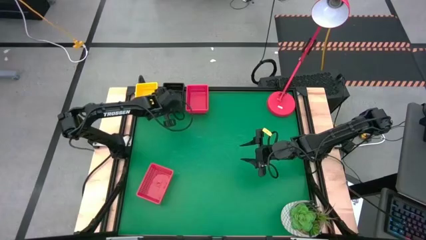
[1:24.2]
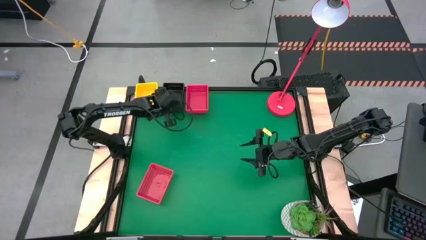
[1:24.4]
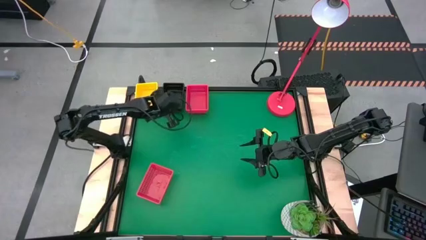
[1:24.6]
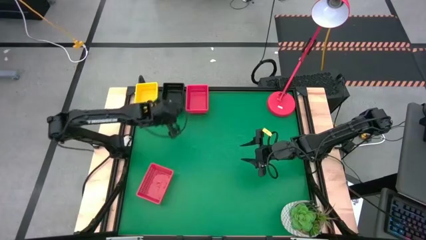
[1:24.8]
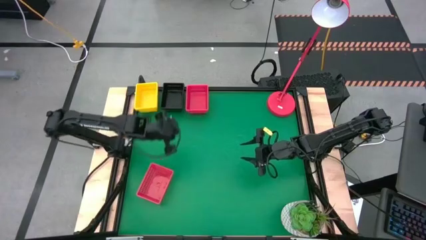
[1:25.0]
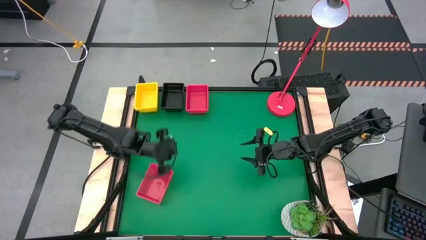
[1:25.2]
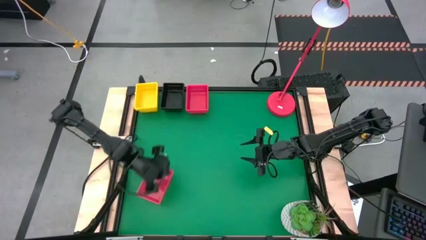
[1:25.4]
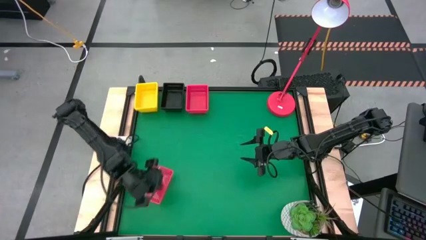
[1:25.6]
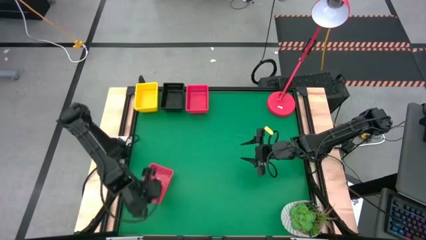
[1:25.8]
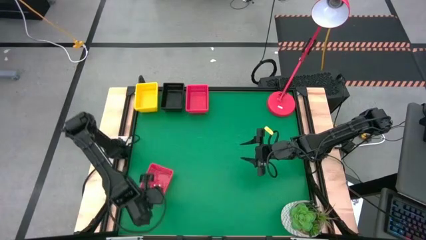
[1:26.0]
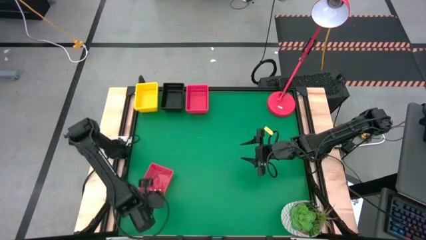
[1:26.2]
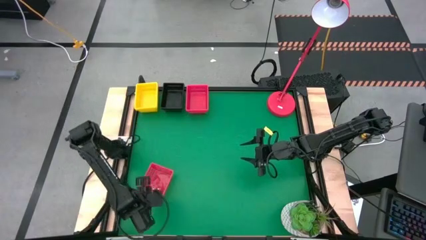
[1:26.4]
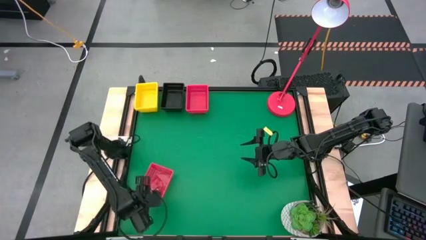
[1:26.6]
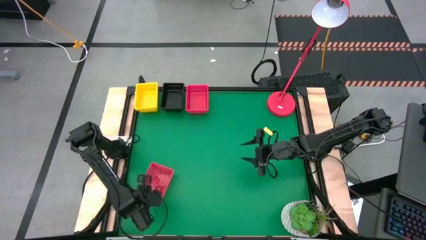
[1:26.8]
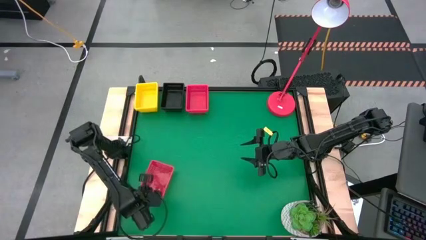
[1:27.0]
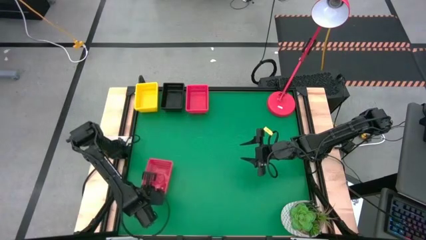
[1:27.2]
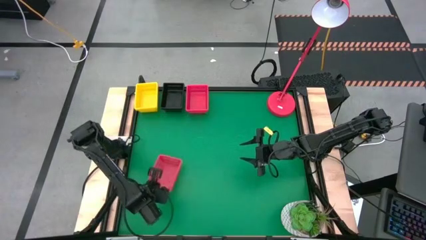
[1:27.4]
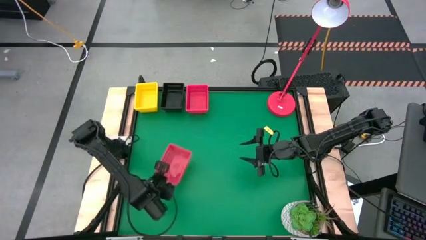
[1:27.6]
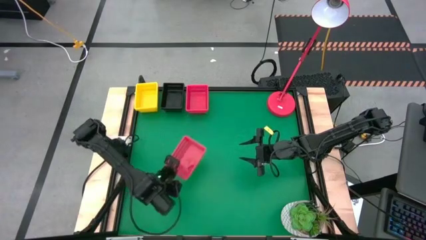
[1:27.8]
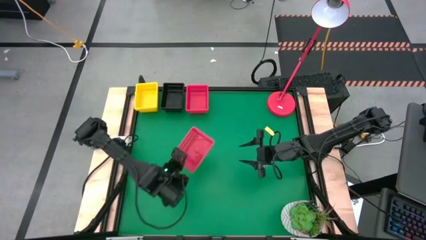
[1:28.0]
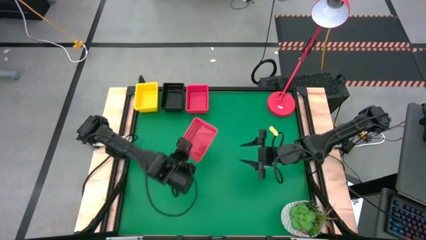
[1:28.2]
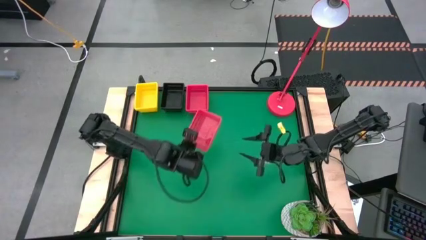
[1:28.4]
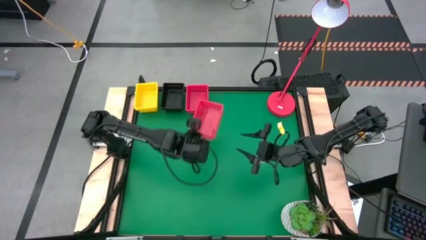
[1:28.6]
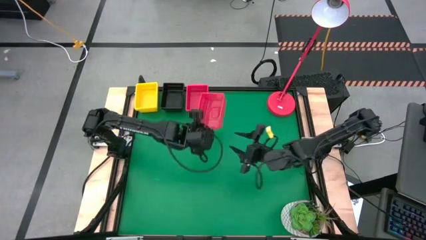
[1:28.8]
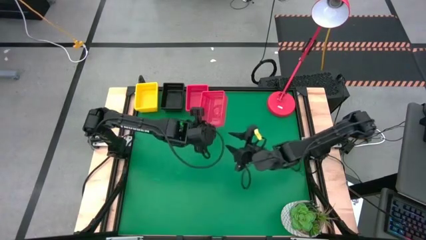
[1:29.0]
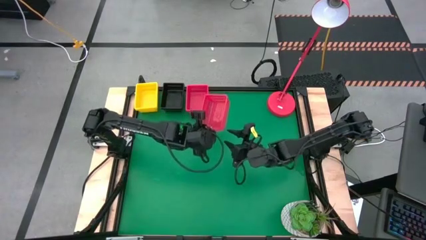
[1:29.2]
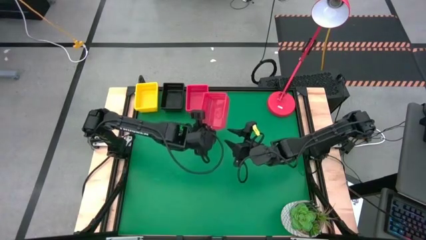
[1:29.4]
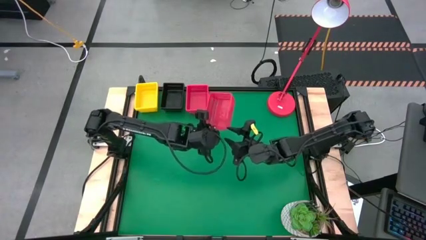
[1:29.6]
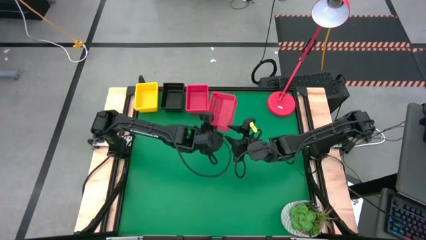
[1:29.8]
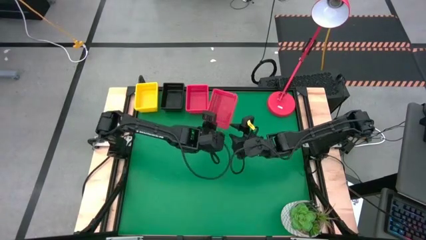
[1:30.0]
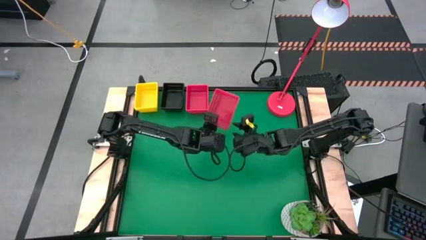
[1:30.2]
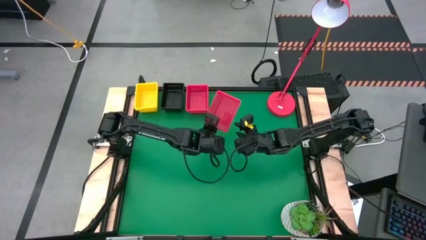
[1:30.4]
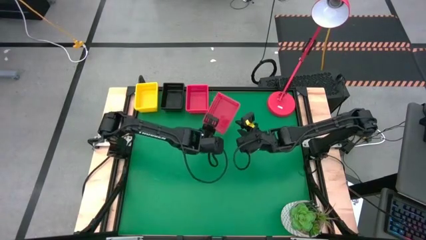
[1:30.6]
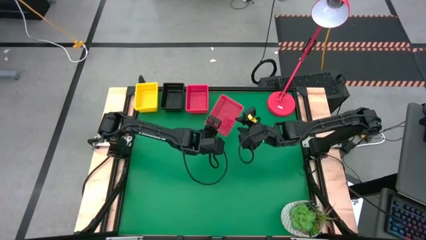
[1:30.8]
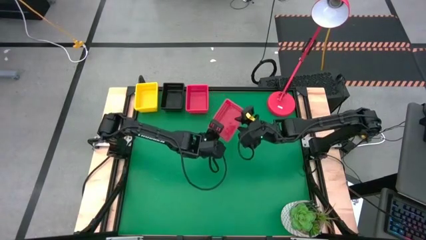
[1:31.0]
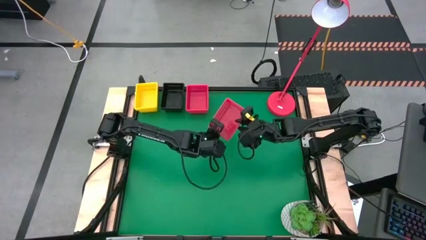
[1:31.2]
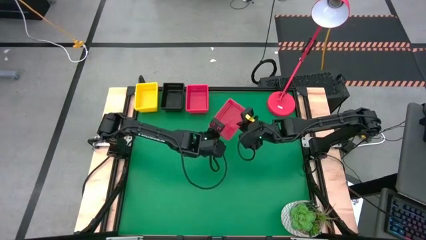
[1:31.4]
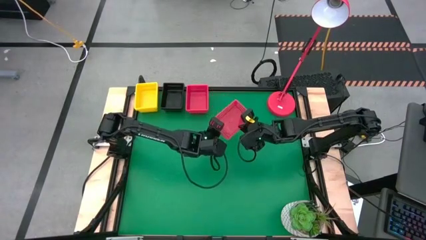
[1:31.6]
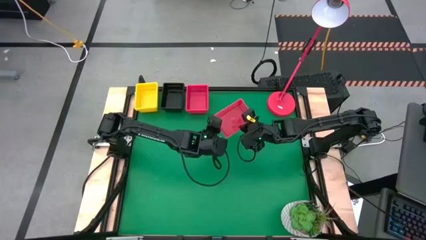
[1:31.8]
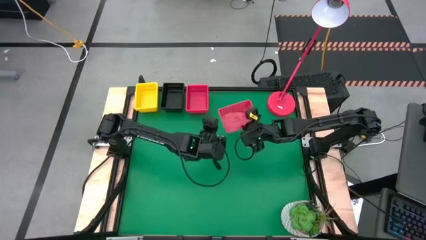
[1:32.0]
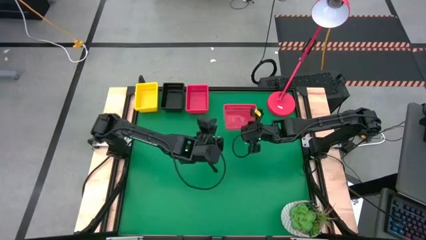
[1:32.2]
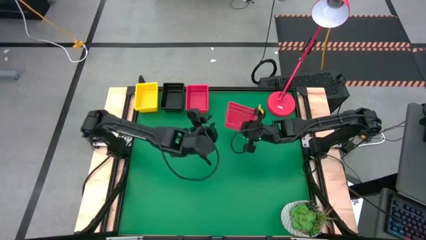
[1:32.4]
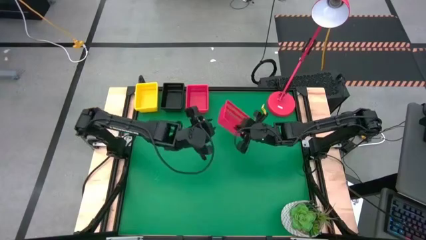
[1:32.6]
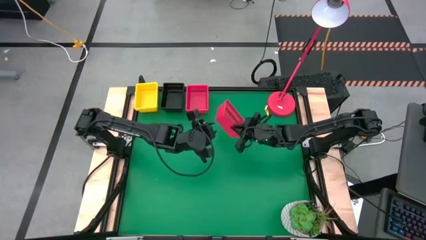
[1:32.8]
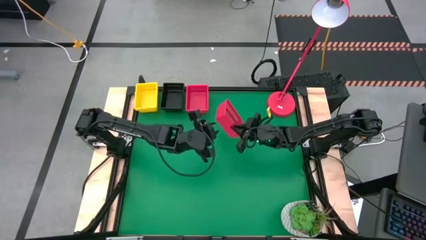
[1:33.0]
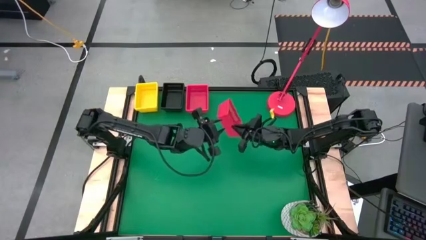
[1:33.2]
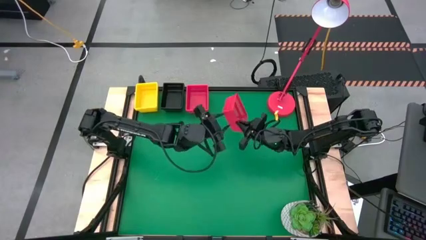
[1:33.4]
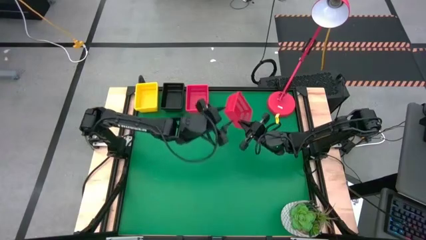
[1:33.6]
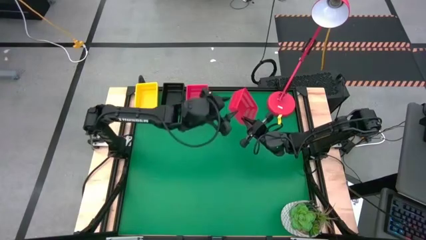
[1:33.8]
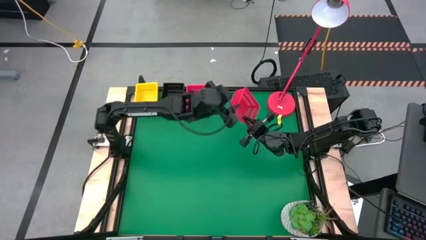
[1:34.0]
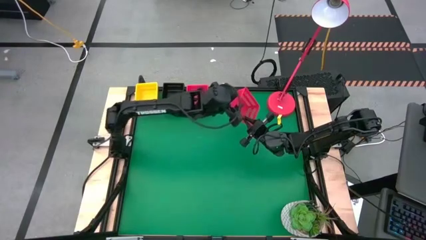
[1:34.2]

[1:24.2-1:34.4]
Stack the bottom red bin on top of the top red bin
